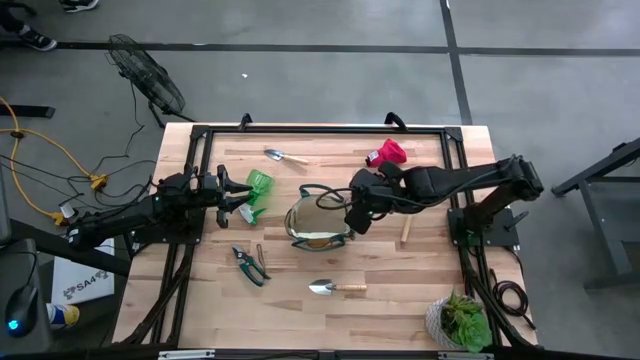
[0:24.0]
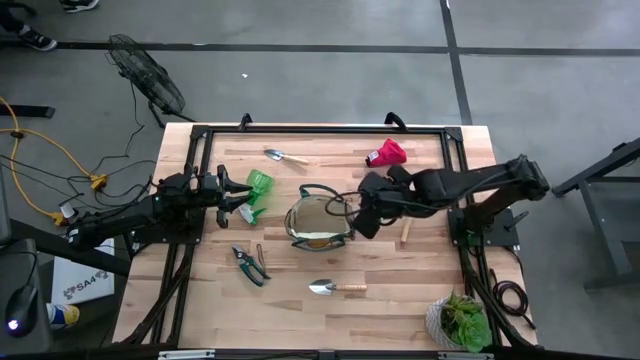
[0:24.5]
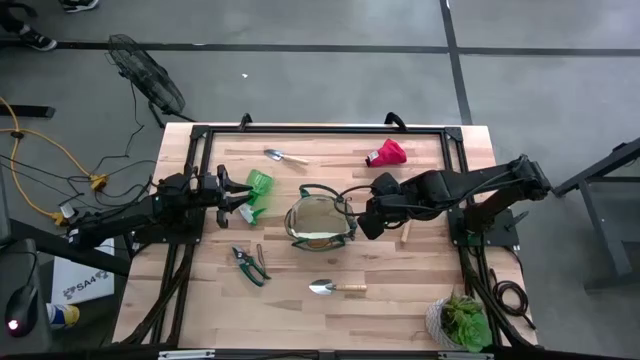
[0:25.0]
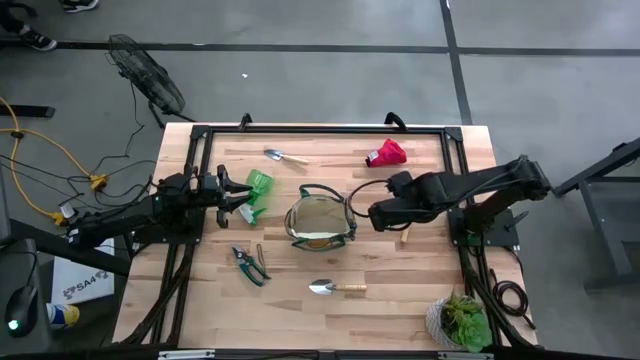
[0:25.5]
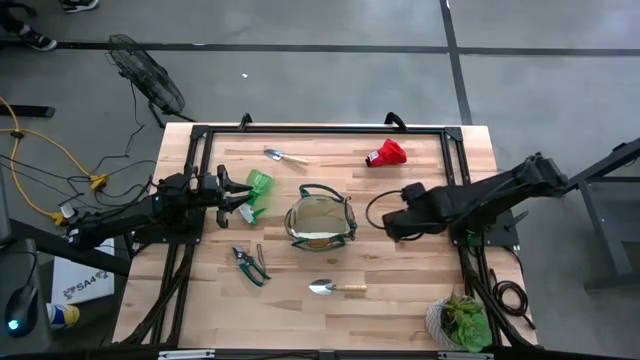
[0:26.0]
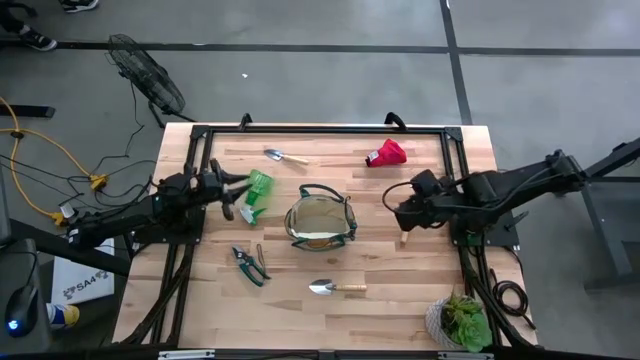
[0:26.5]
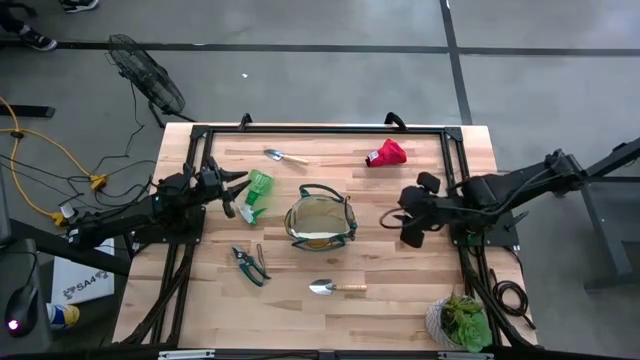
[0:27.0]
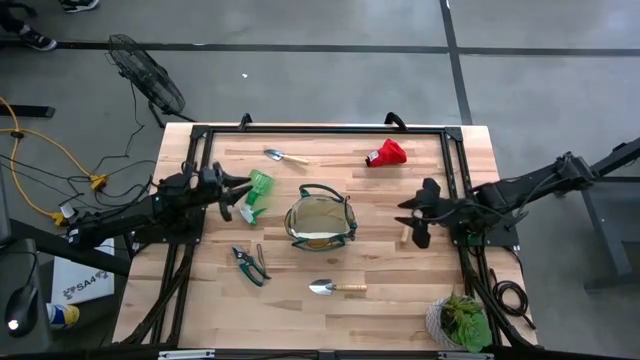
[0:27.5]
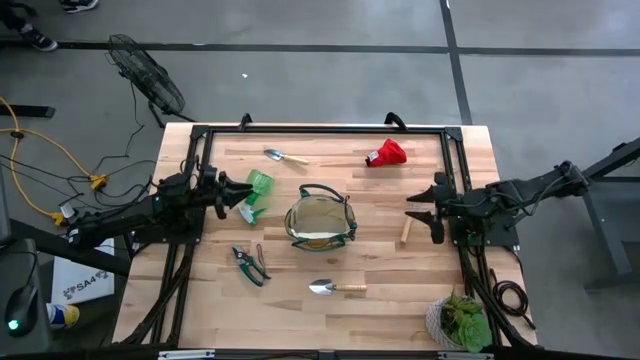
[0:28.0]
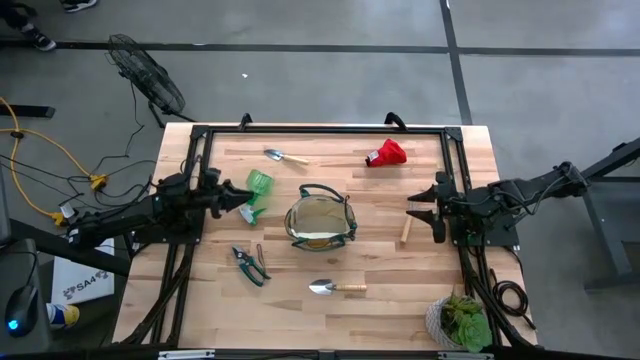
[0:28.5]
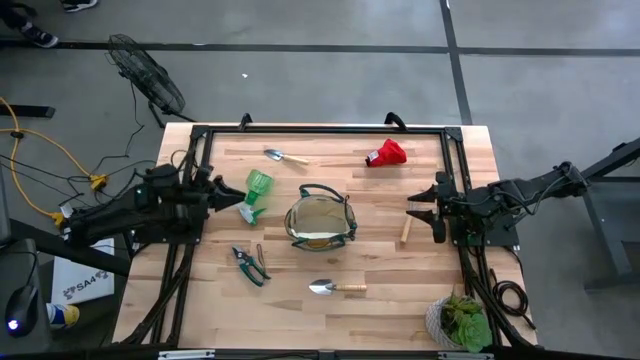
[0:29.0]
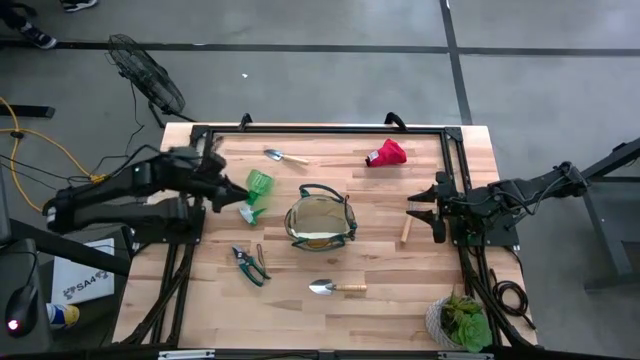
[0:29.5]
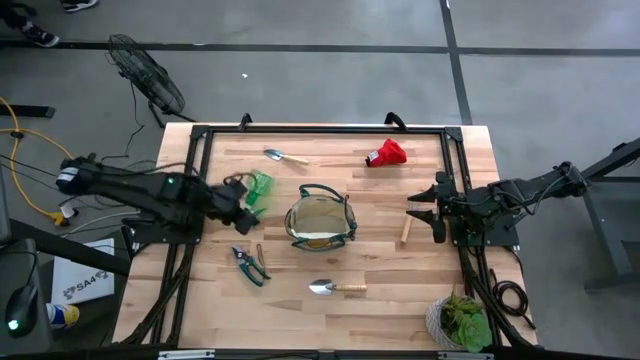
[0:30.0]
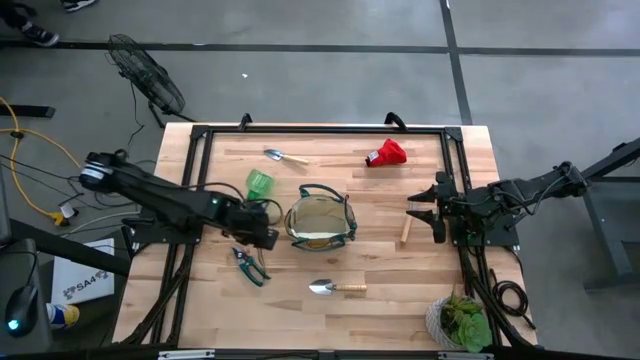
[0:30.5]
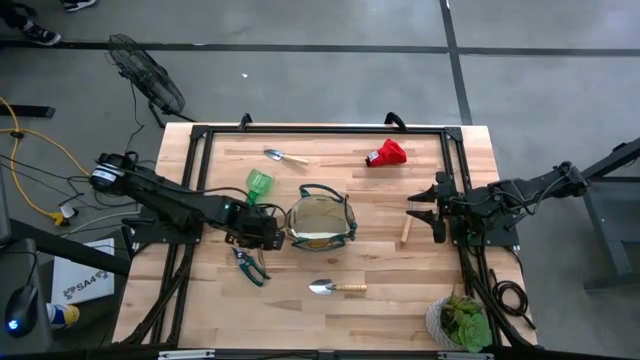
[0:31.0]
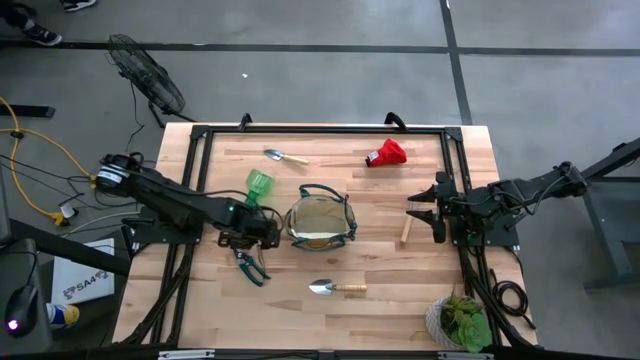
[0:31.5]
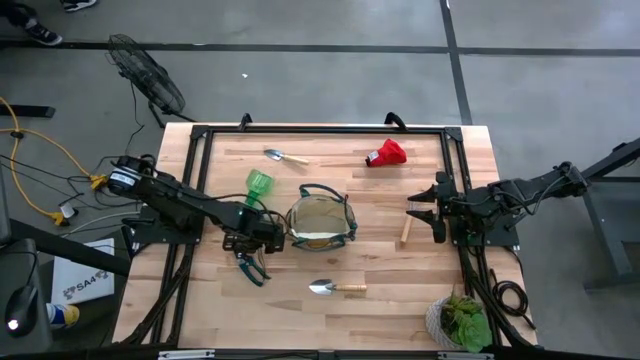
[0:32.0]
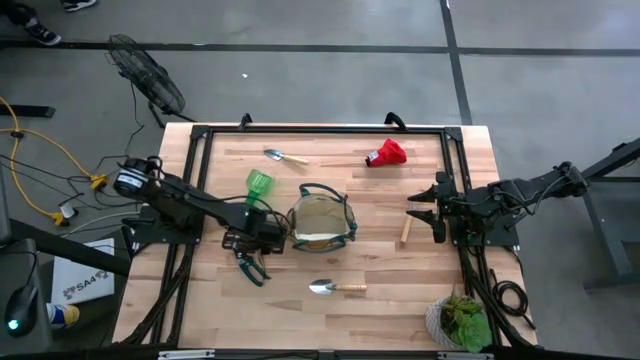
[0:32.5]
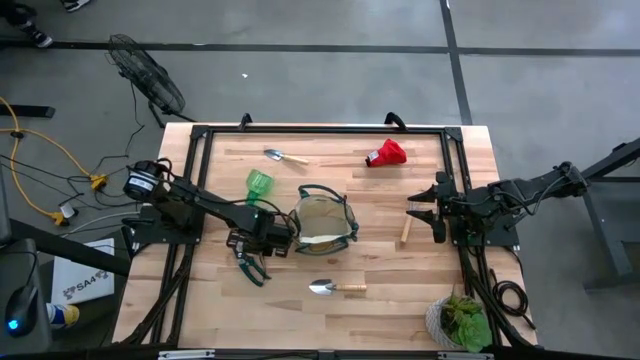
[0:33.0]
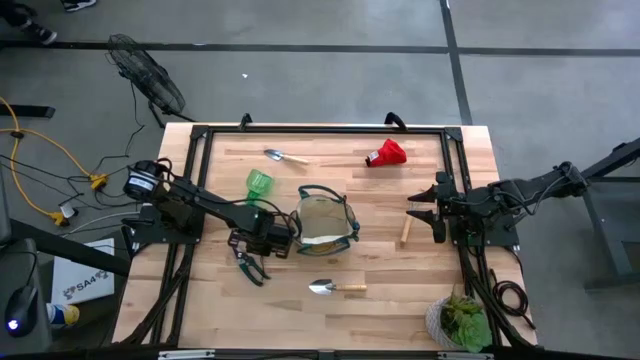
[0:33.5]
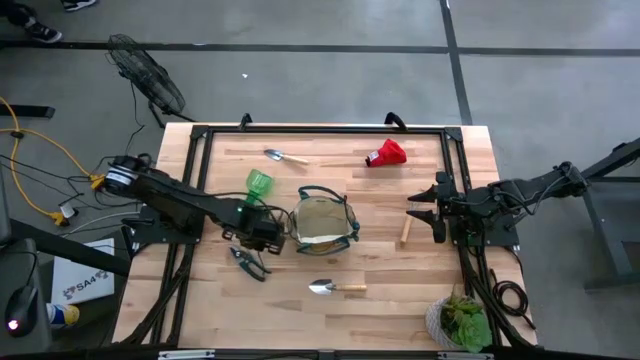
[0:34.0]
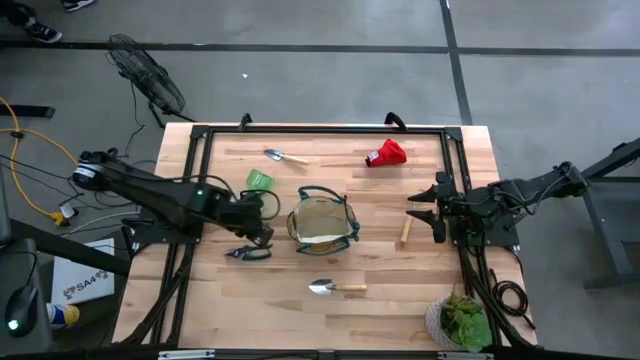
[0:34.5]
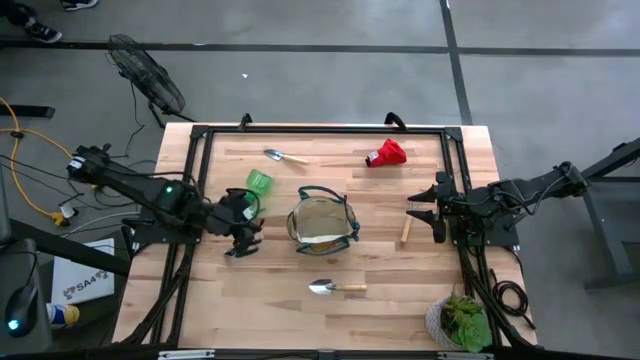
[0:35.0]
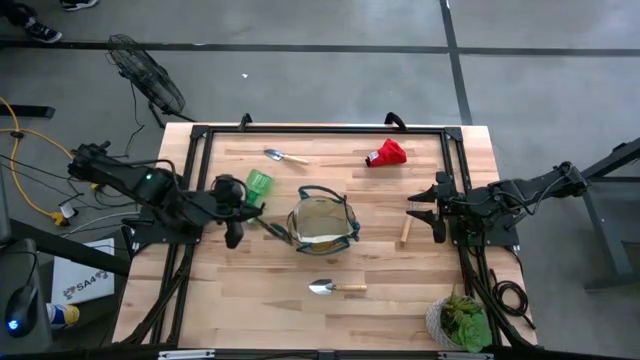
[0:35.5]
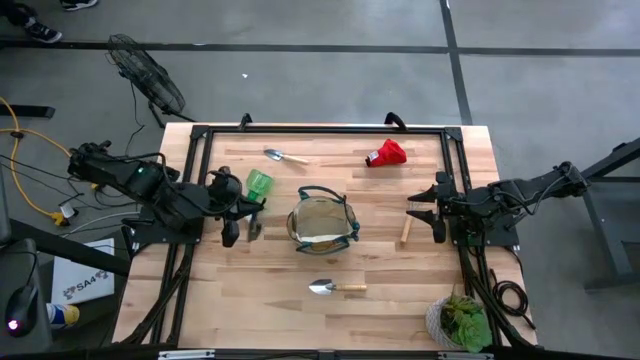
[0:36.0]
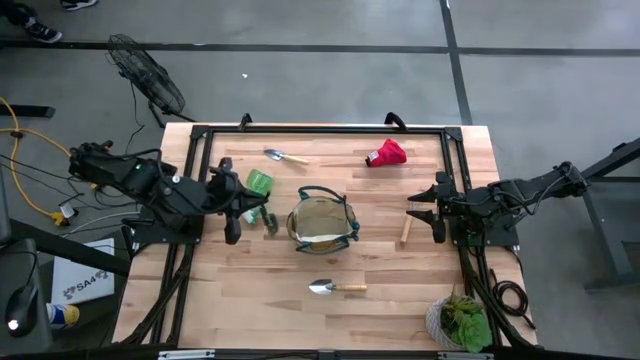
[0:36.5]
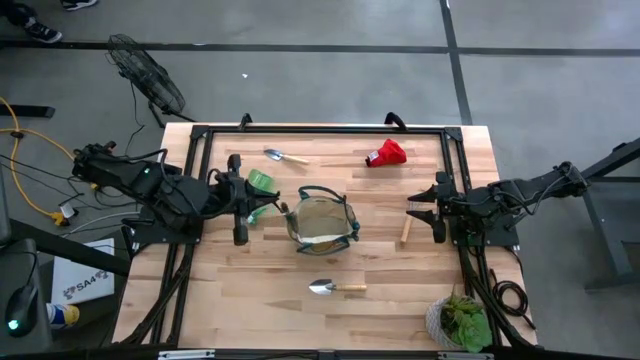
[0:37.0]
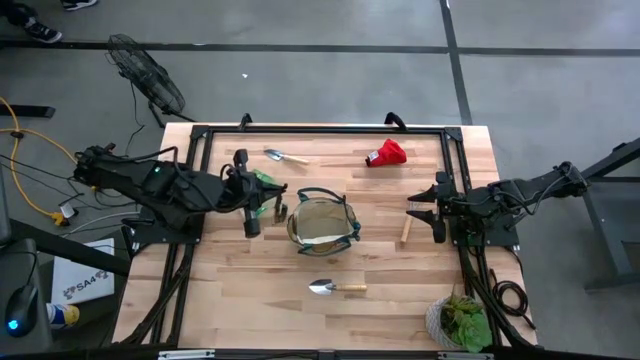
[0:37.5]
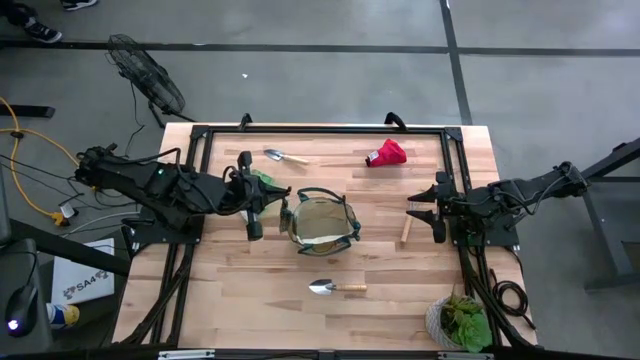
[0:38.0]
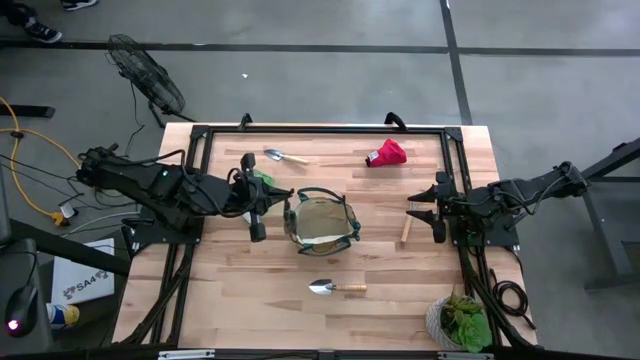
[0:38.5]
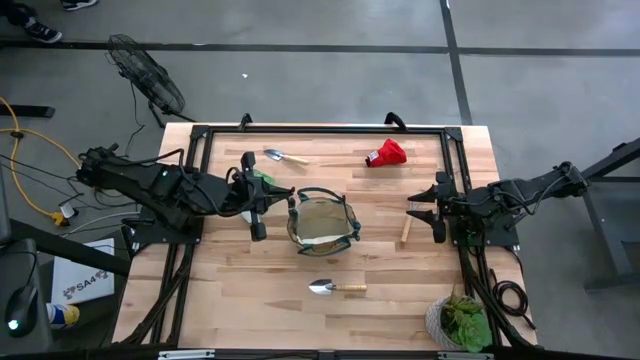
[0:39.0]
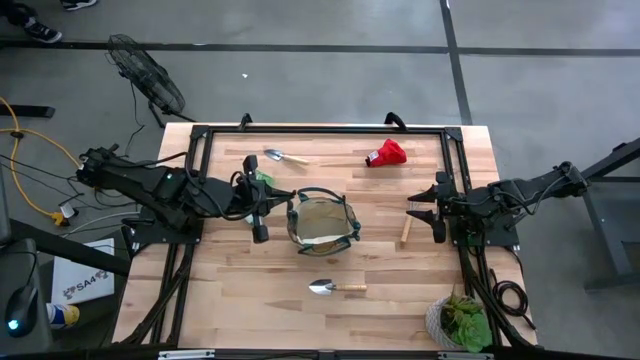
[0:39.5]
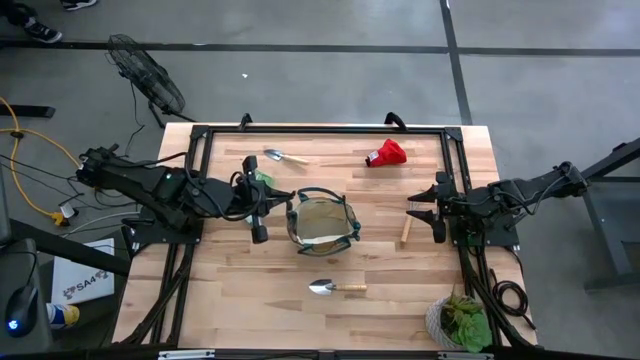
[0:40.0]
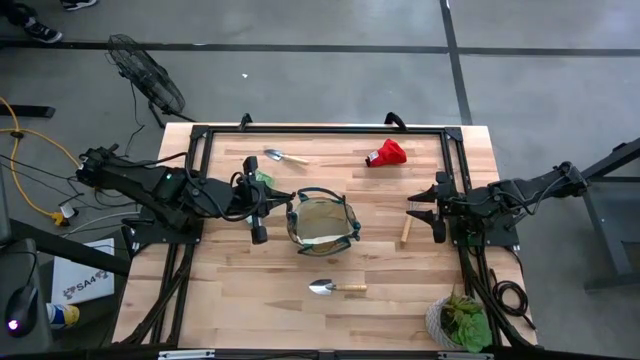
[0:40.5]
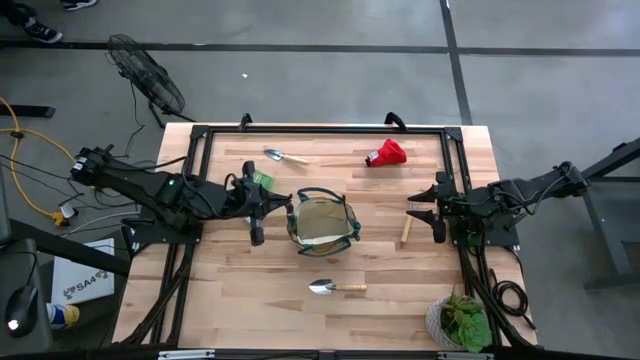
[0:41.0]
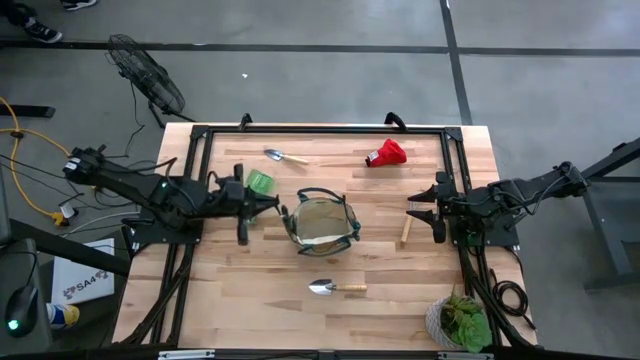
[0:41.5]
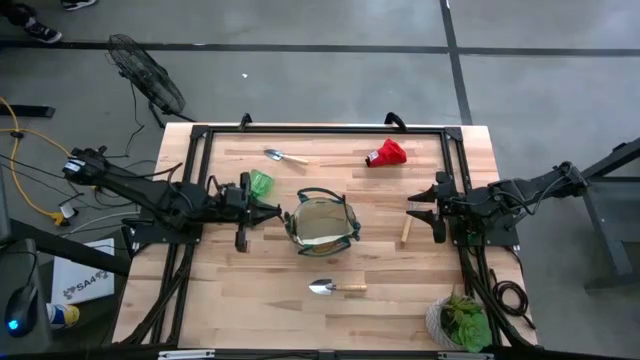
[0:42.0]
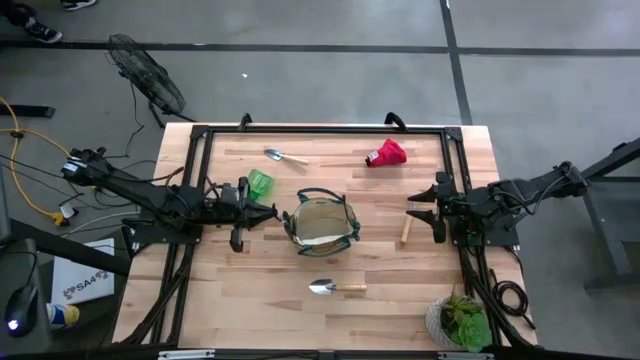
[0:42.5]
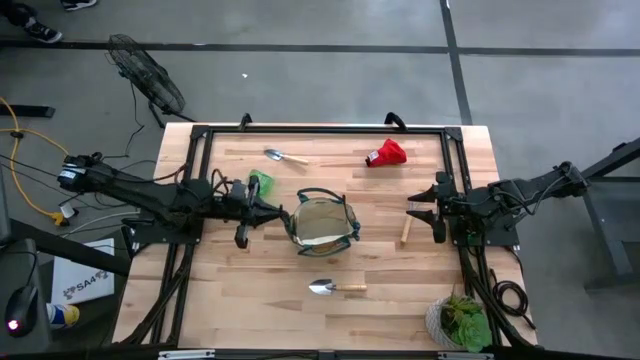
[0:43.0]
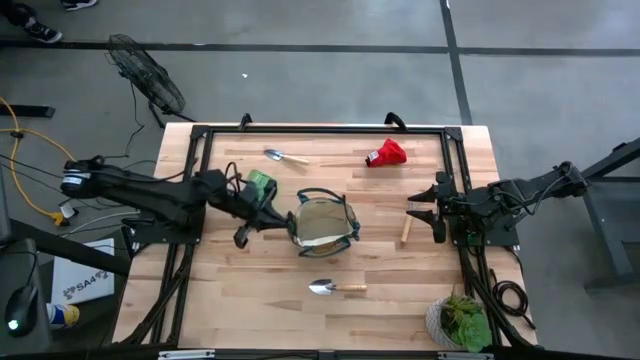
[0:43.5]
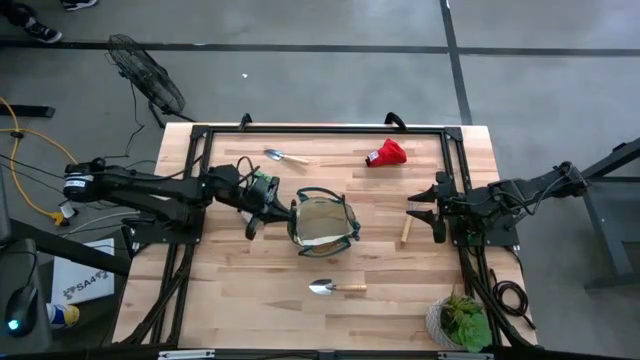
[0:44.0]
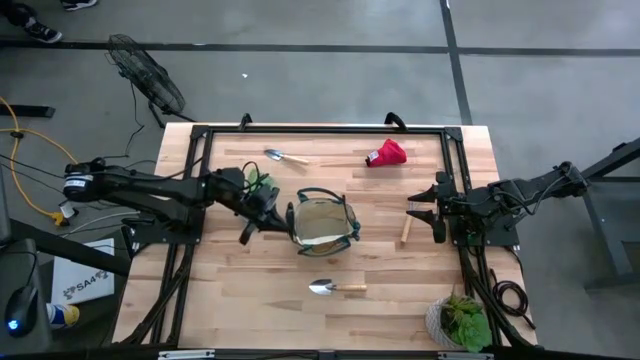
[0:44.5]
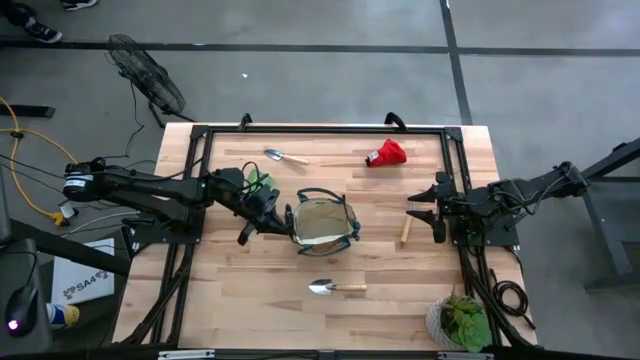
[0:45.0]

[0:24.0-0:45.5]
Task: Pick & Place Garden tools in Gardening bag
Put the green shears into the gardening bag
